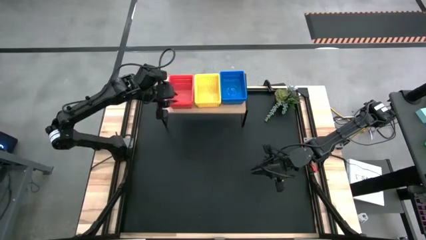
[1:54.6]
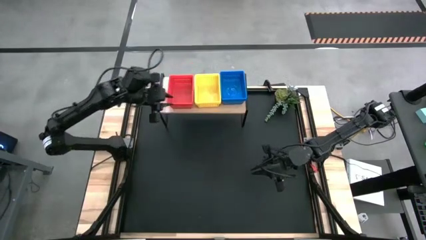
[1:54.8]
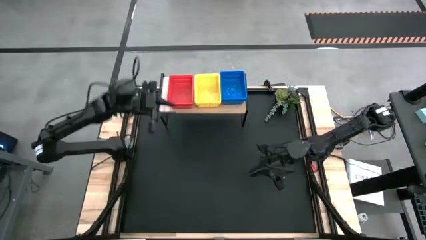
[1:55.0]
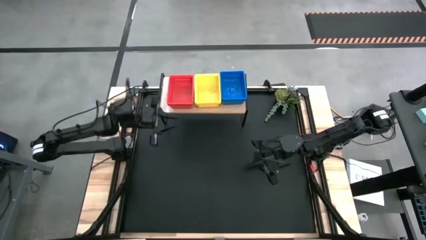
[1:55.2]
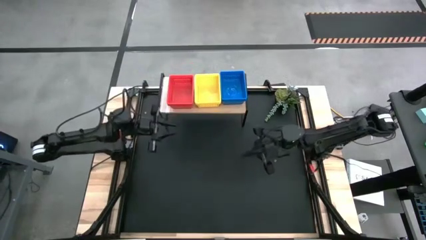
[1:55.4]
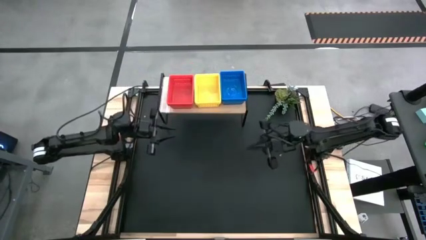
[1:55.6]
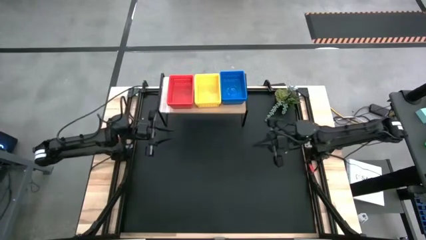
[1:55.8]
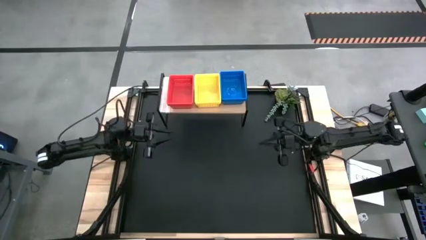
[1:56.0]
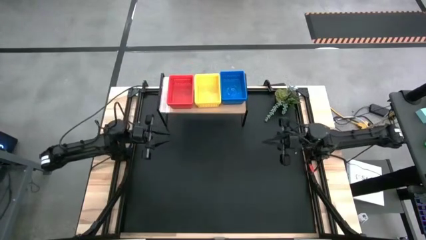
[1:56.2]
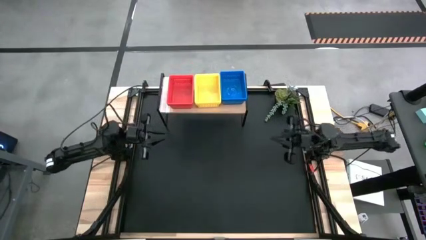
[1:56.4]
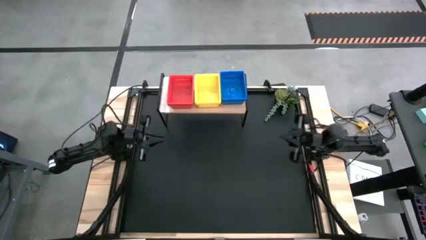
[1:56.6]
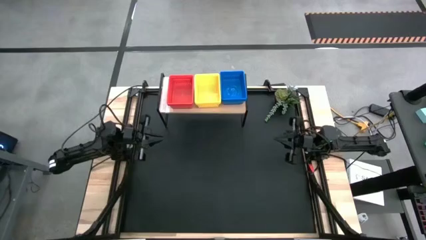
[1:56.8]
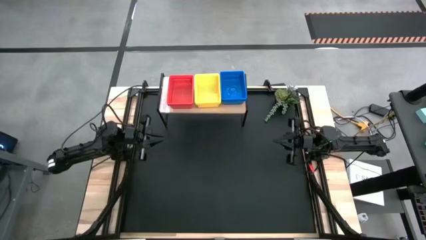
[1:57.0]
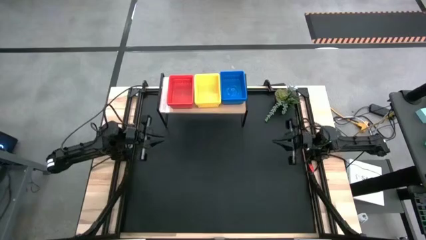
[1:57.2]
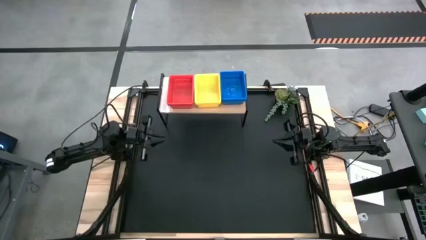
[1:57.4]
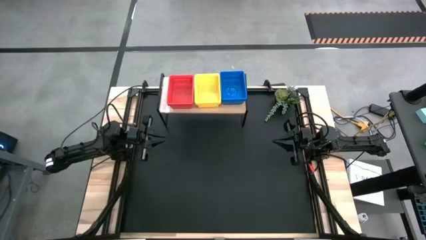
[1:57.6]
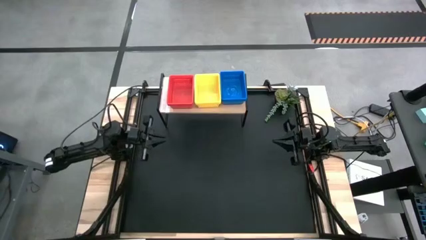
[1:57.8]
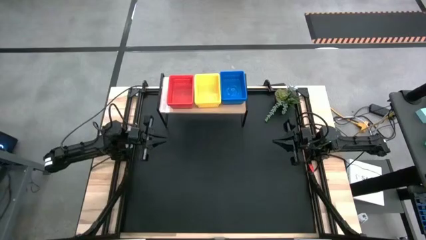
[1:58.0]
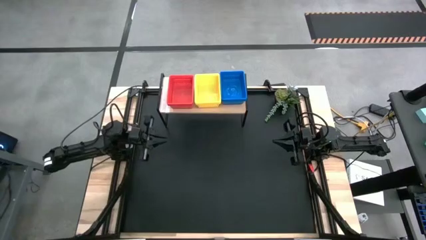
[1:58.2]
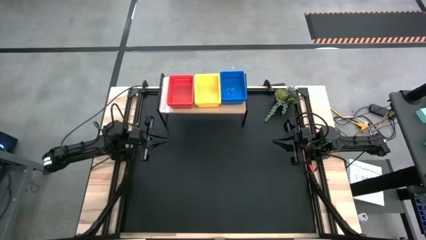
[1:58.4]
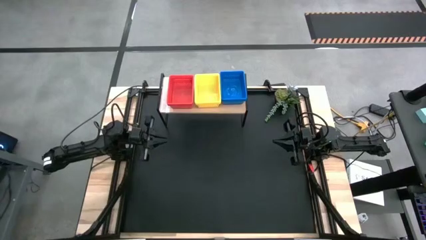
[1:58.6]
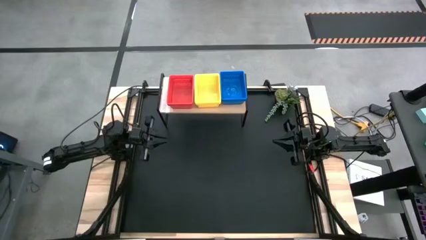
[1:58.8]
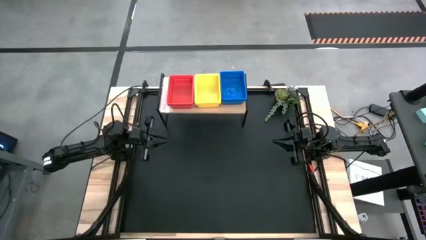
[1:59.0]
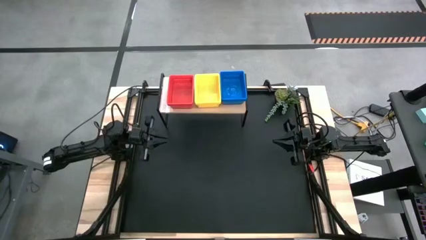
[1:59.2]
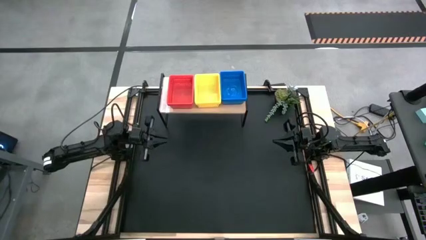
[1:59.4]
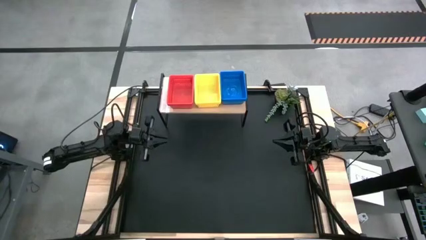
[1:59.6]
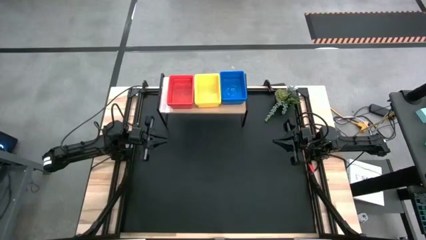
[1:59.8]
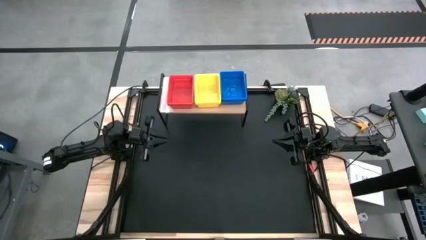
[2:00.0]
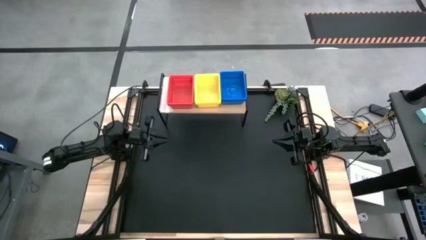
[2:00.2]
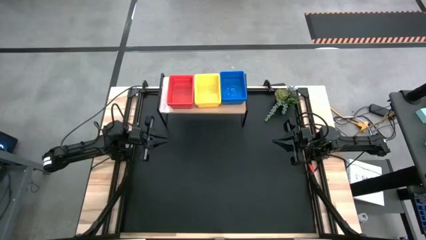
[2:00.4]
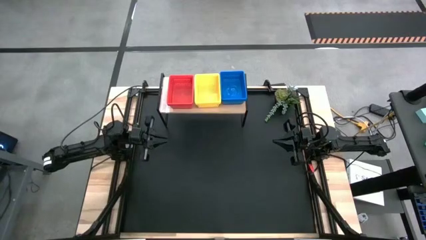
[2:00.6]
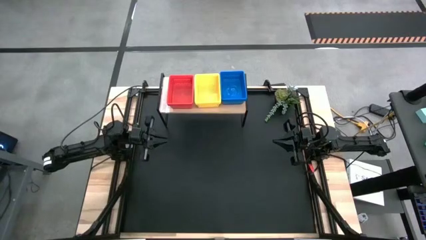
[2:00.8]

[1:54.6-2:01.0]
Task: Stack baskets on shelf by color
Return to Home Position

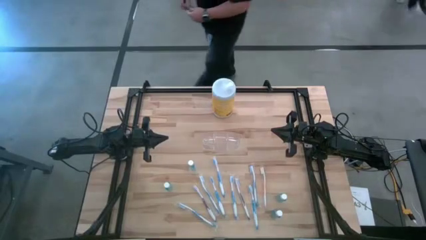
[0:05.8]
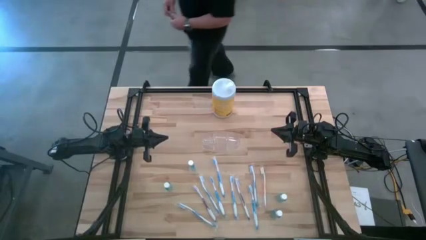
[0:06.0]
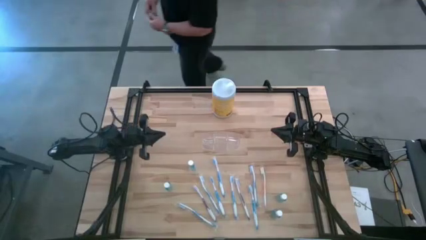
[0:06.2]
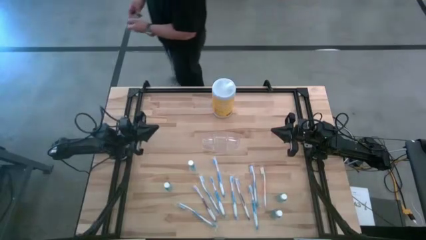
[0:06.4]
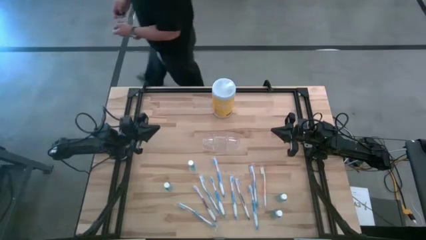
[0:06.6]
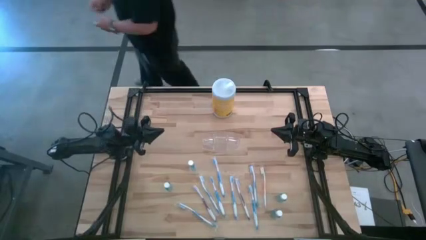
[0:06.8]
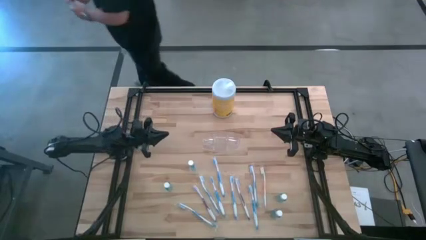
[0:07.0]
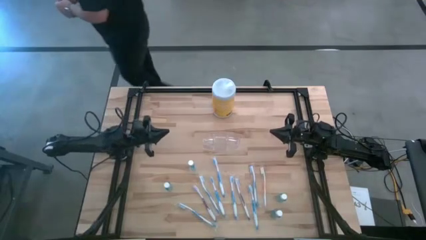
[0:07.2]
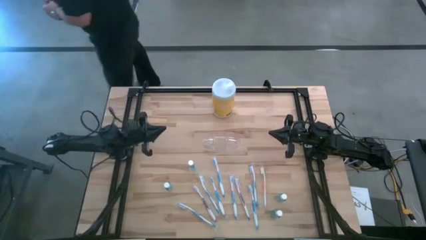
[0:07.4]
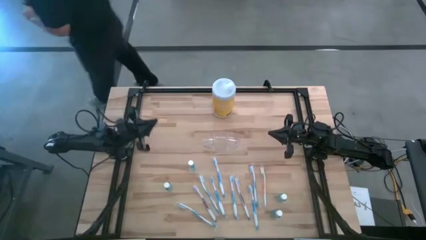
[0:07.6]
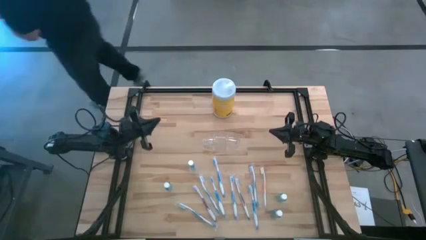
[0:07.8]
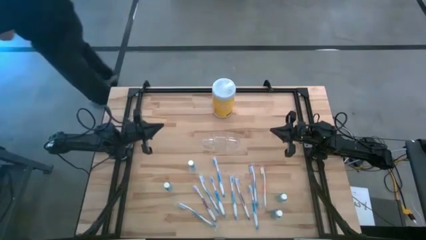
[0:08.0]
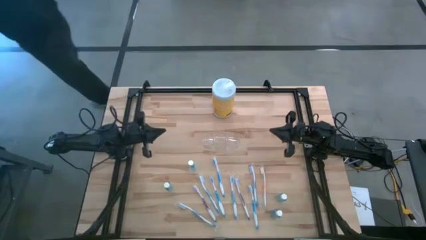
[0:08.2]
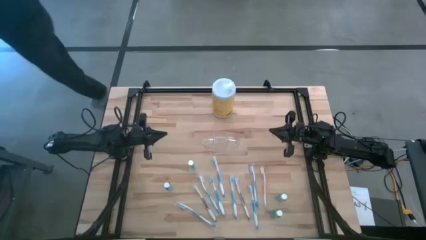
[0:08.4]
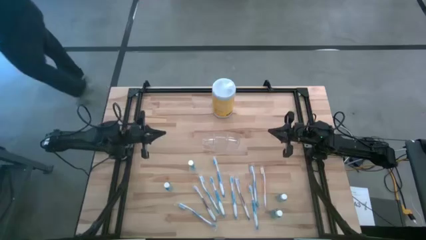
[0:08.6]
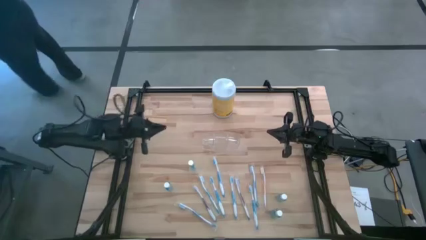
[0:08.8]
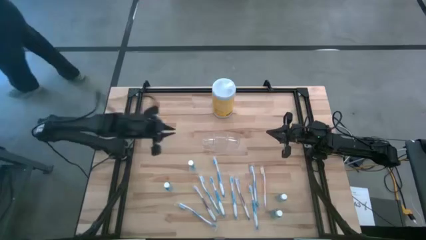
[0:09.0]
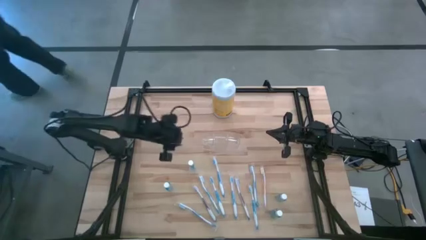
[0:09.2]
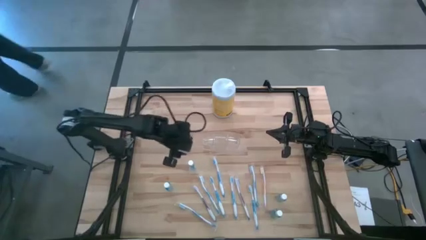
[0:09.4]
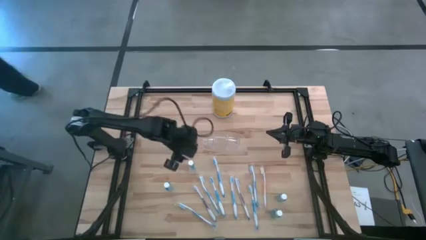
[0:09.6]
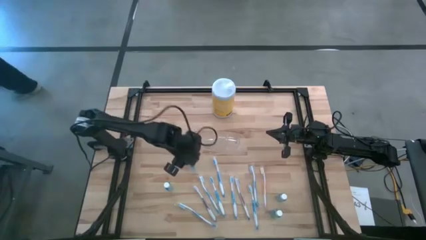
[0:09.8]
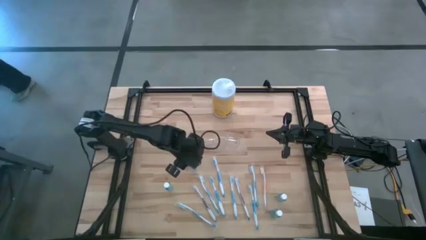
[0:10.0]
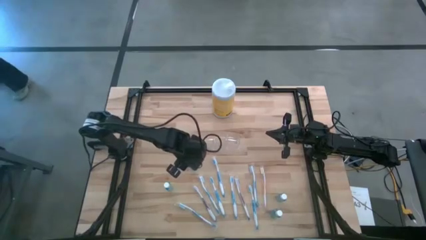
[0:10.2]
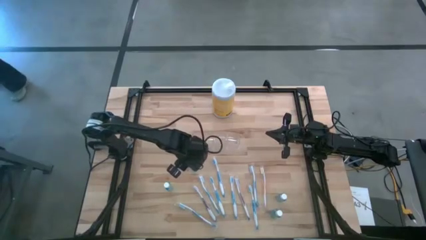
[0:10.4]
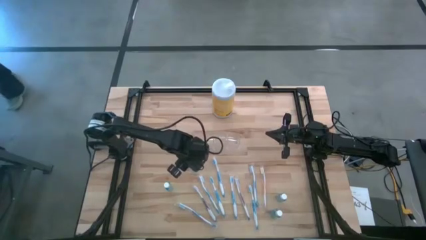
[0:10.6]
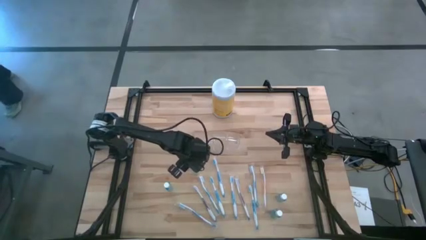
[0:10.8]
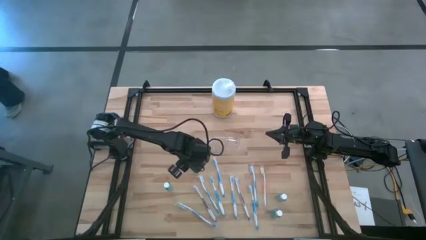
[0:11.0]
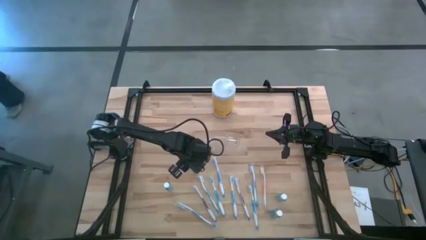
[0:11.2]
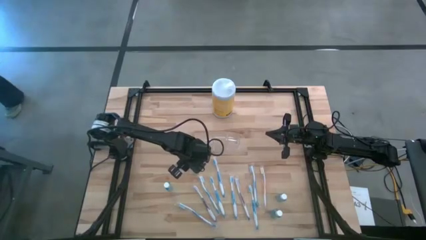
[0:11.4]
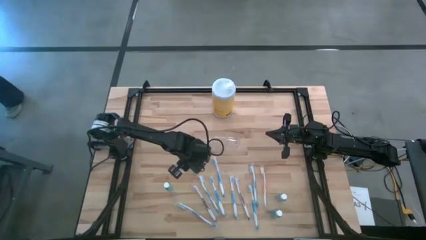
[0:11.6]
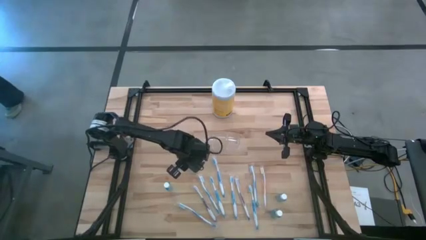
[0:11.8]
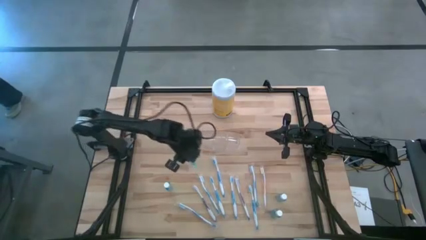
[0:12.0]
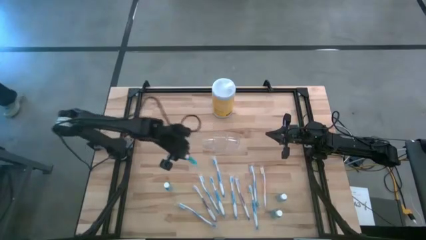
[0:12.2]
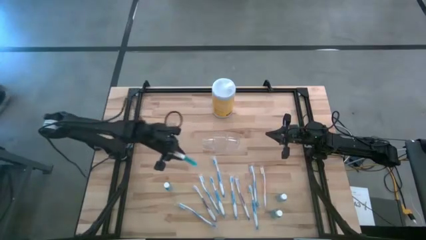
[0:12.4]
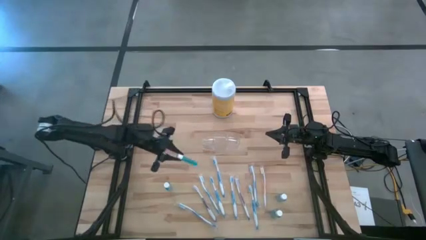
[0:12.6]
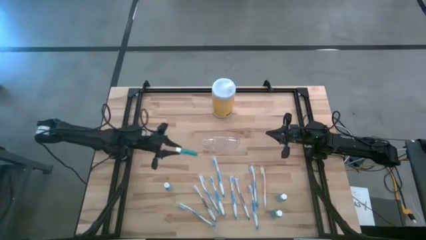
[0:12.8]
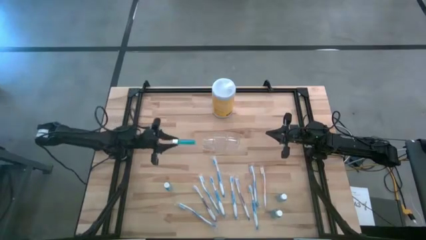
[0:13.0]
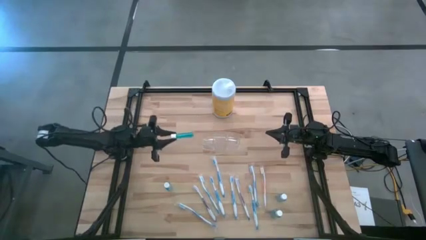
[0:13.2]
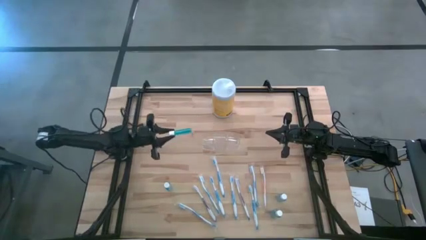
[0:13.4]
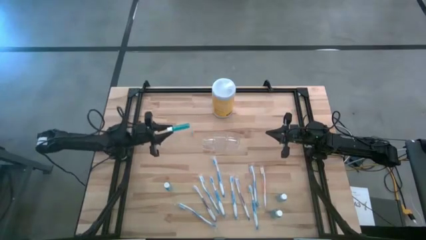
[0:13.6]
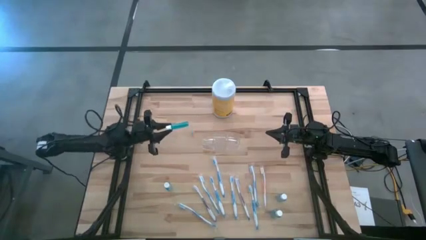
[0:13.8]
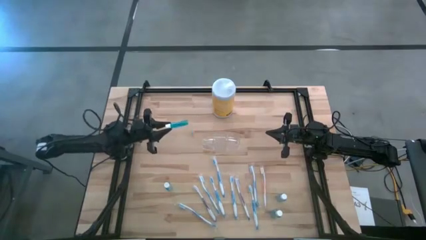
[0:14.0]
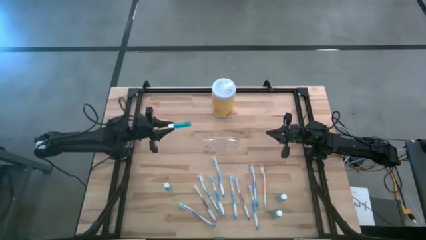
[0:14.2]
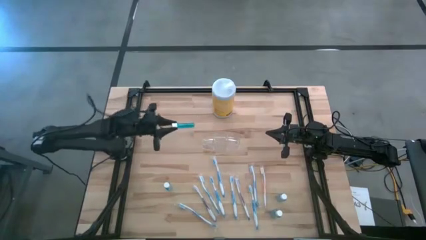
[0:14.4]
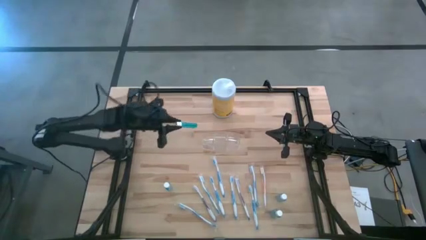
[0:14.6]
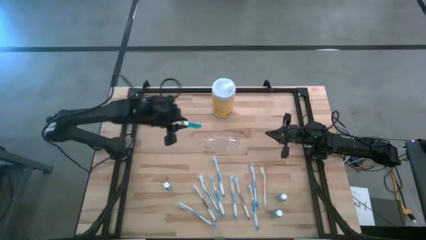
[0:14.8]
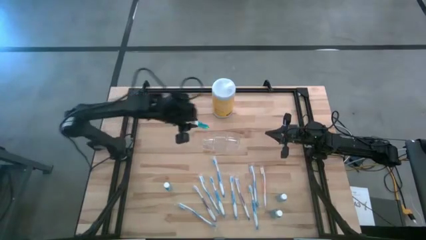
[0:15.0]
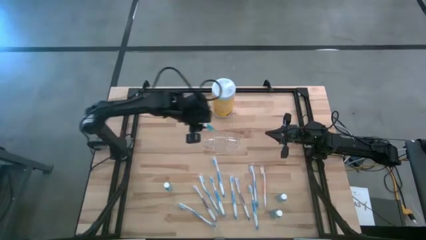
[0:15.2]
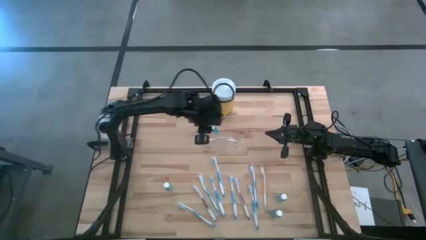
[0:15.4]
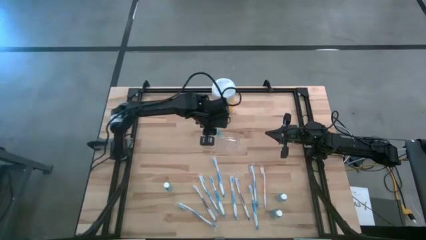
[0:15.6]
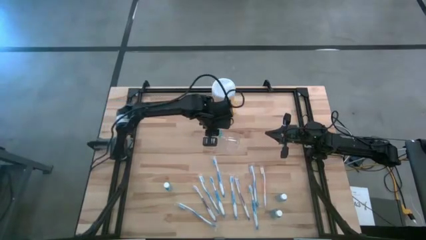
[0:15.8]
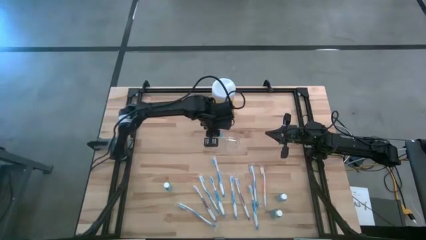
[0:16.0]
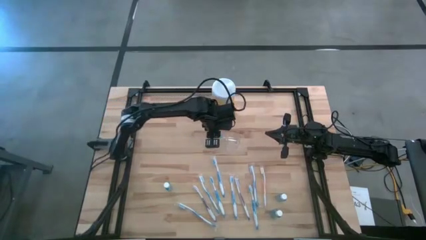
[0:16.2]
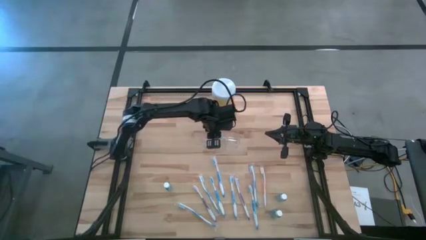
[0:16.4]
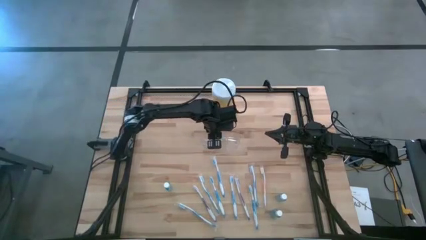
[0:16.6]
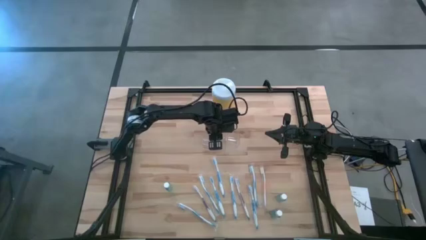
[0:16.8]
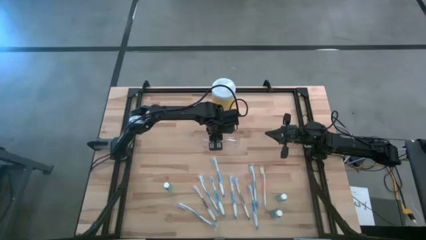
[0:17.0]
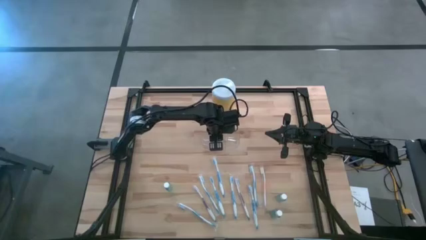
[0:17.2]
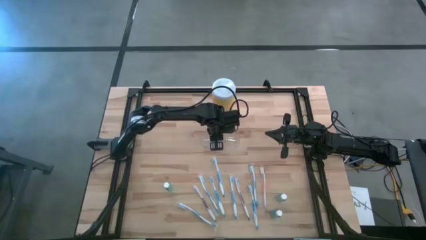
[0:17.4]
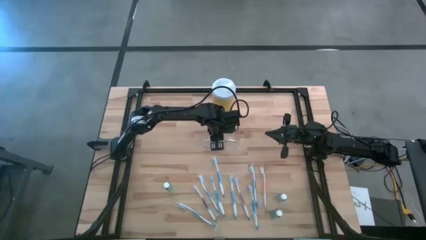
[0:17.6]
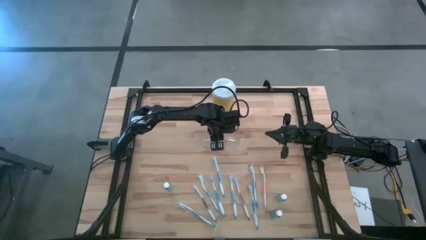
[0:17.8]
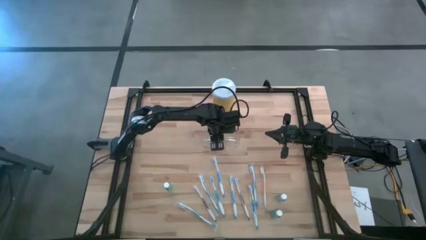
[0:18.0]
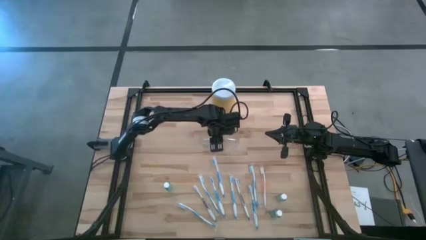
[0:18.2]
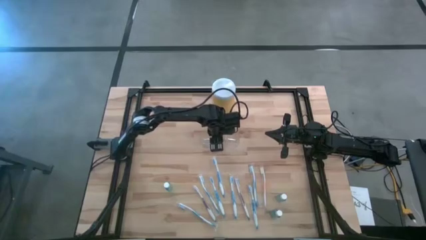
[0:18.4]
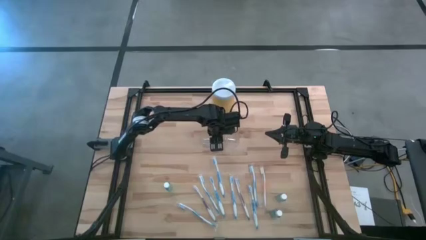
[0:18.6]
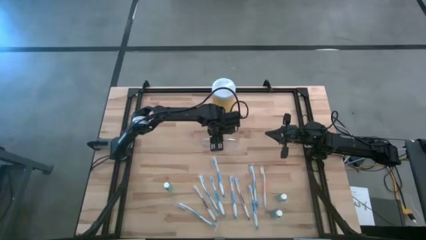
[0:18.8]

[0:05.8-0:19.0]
Task: Pick & Place toothbrushing station
Put the blue mouthwash into the transparent organizer
